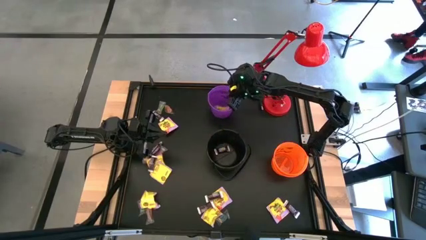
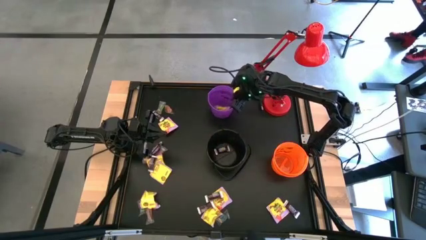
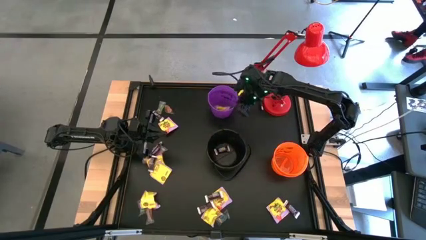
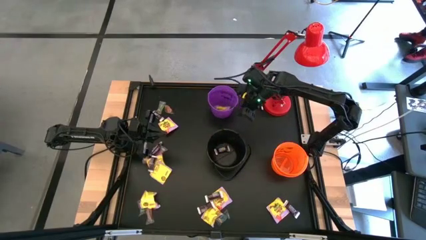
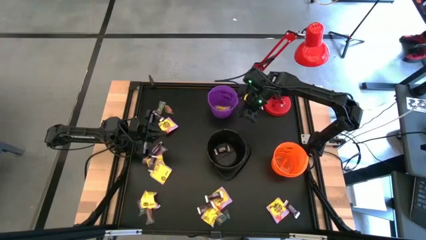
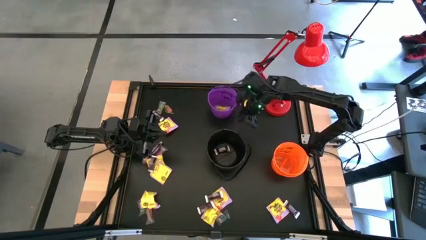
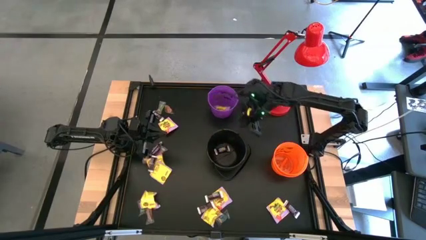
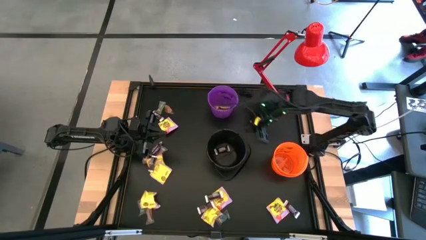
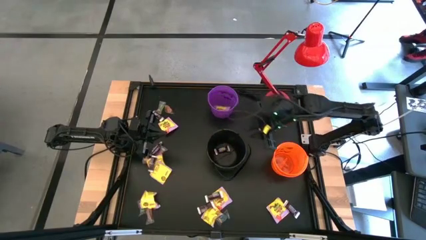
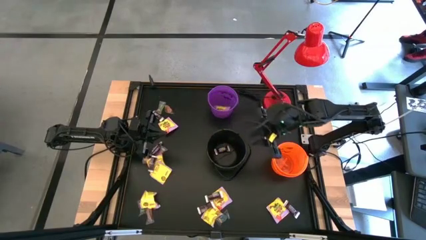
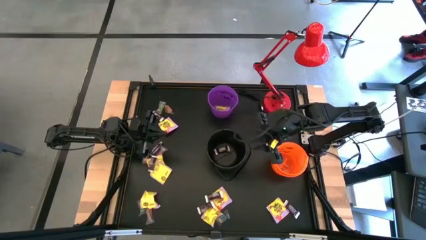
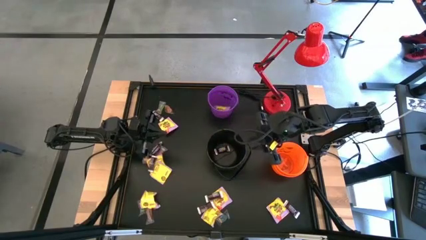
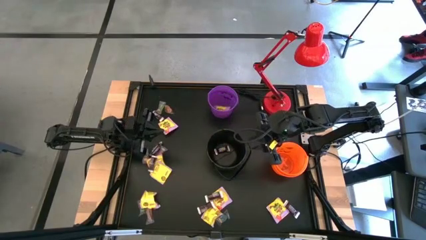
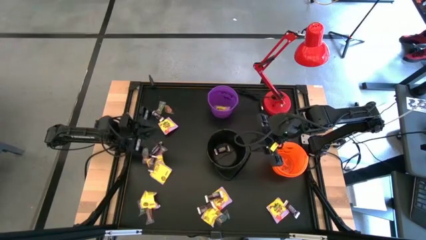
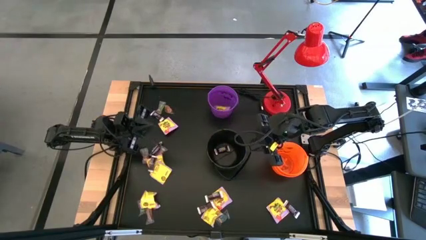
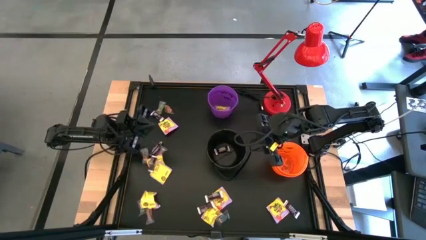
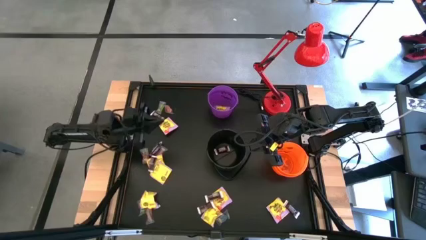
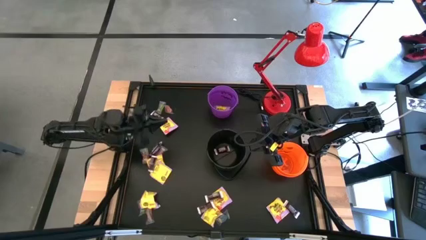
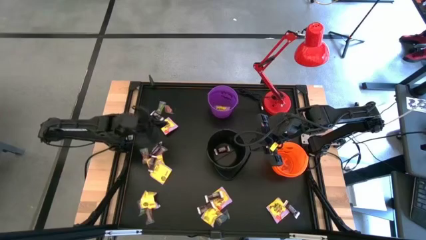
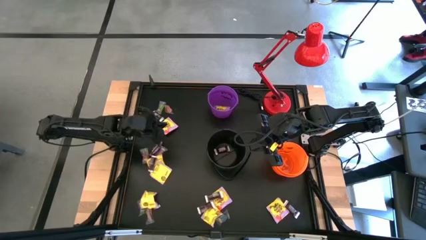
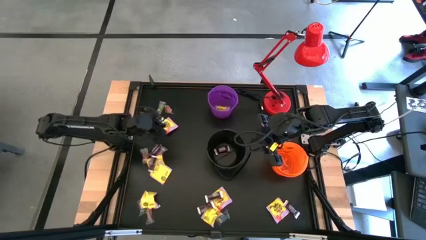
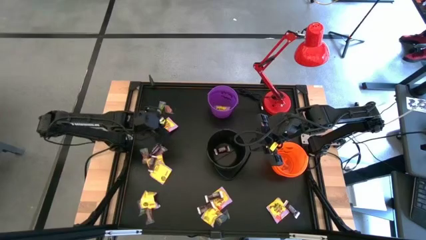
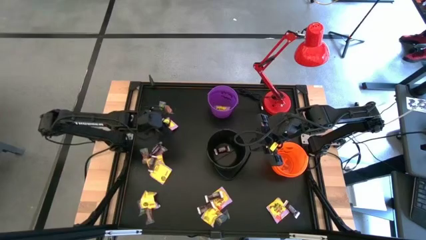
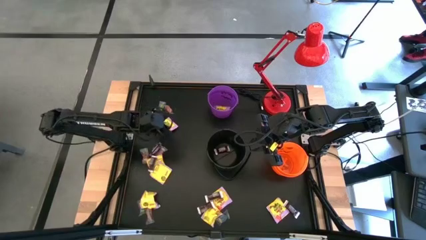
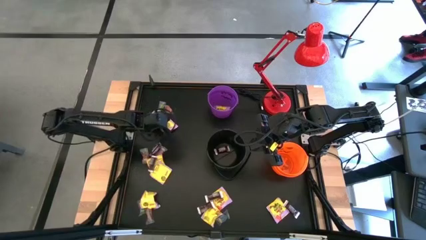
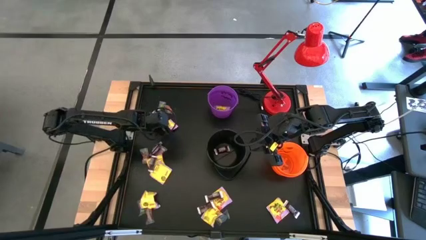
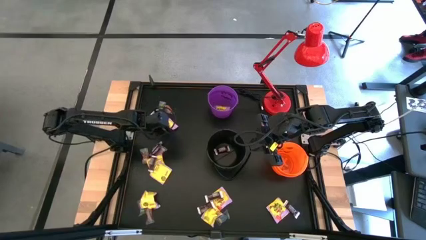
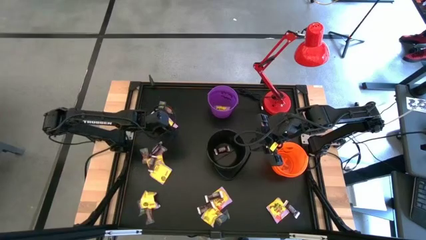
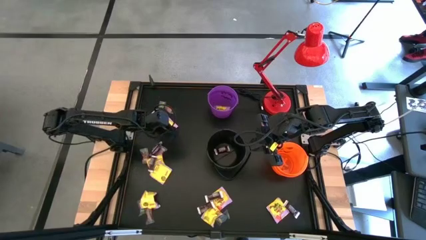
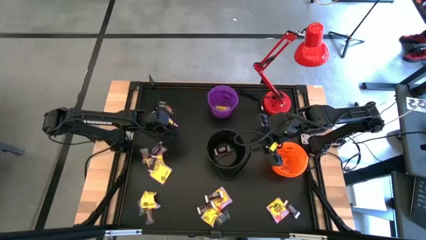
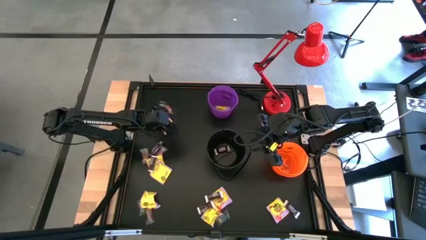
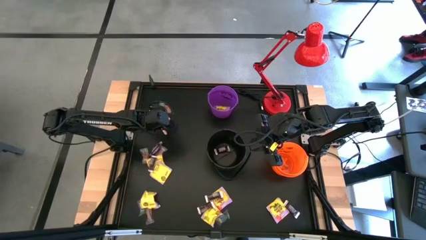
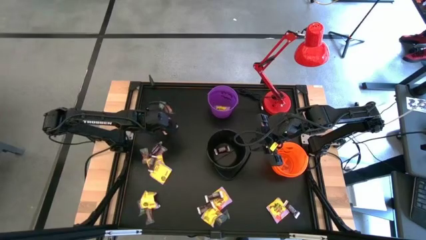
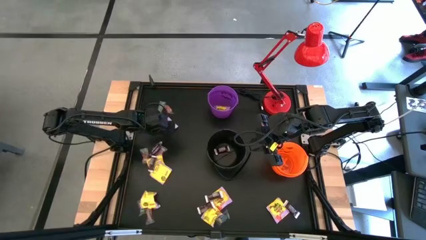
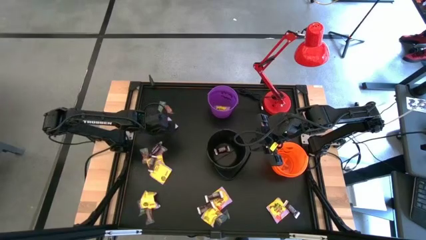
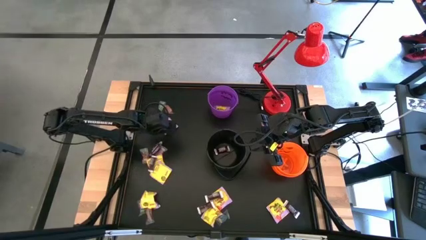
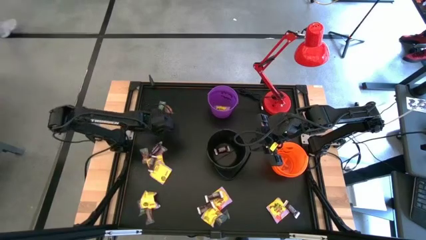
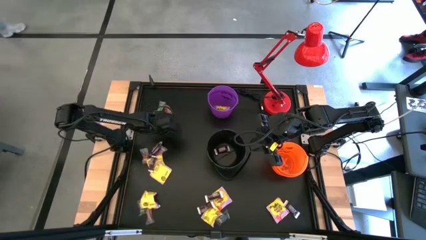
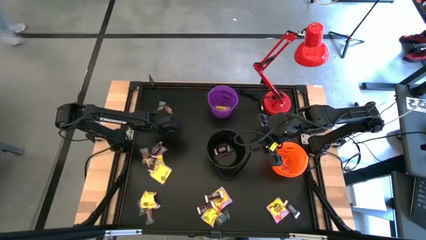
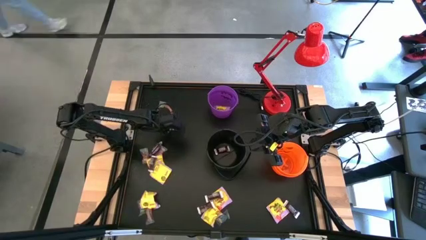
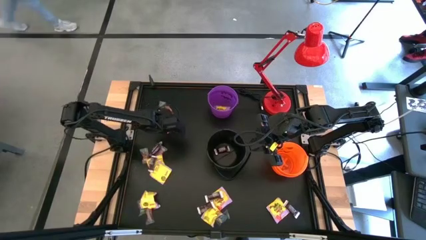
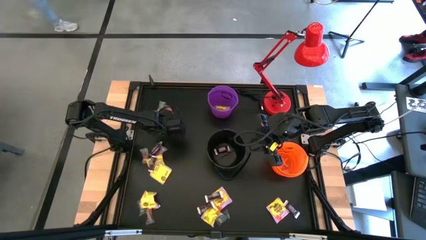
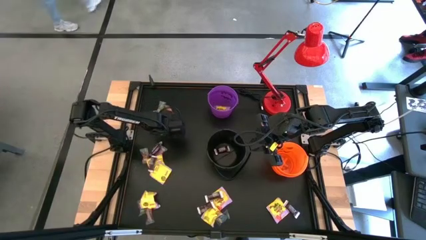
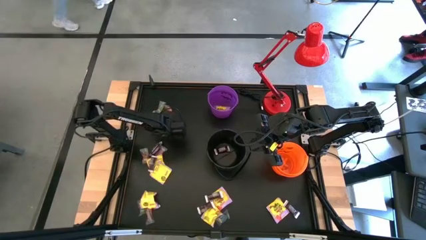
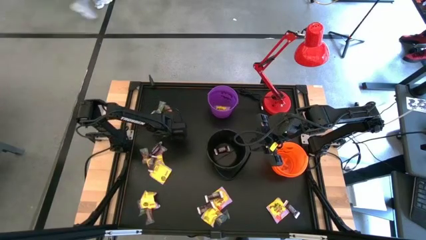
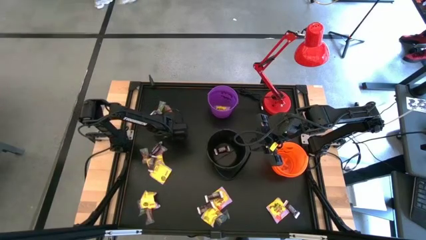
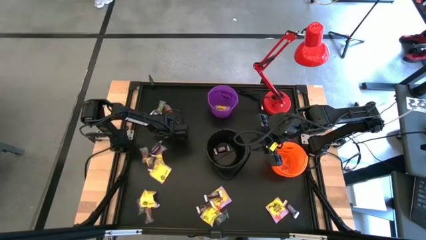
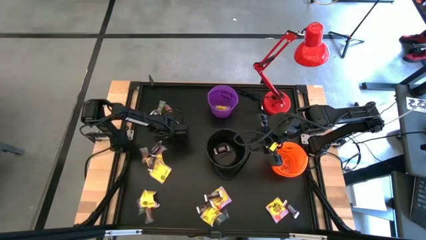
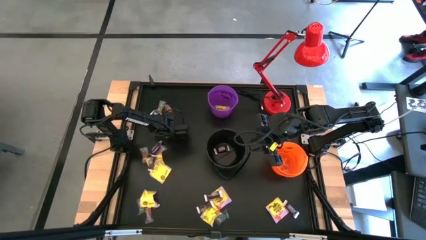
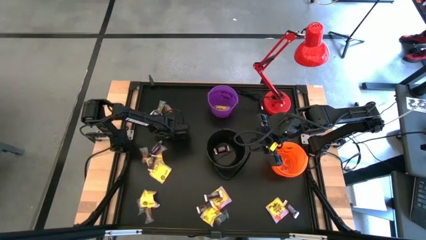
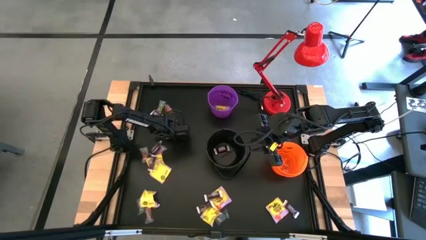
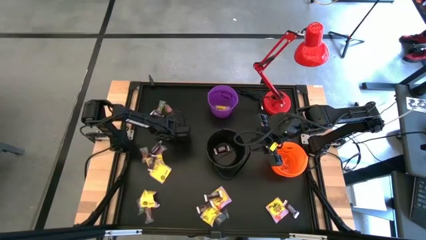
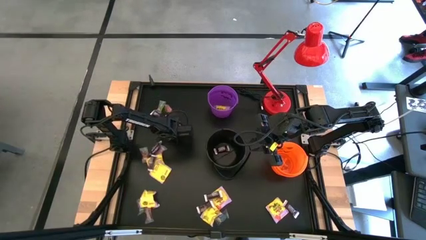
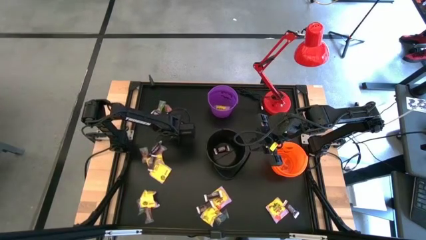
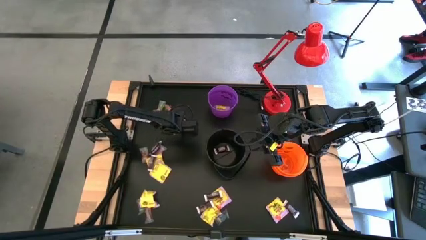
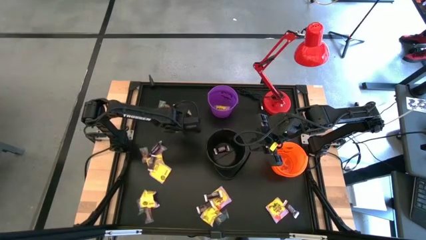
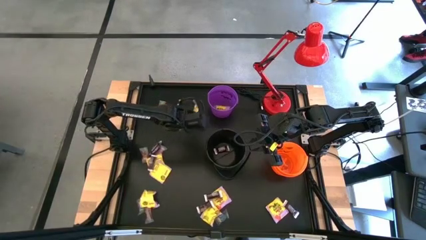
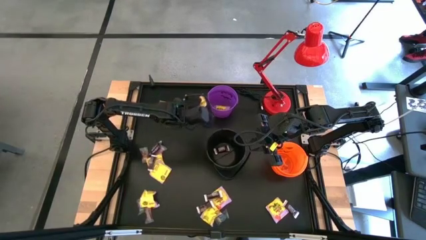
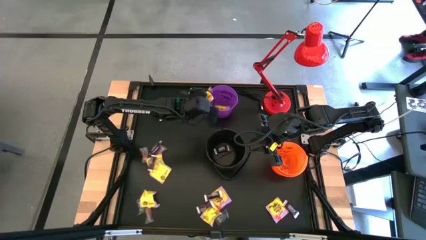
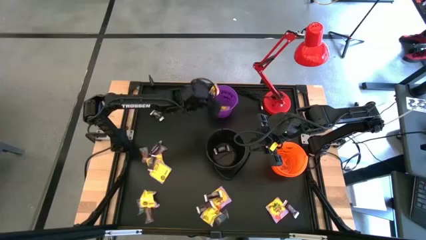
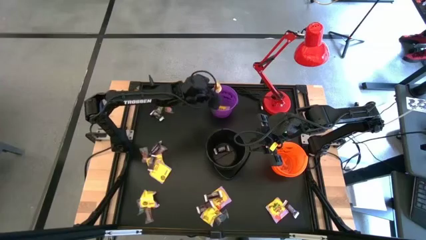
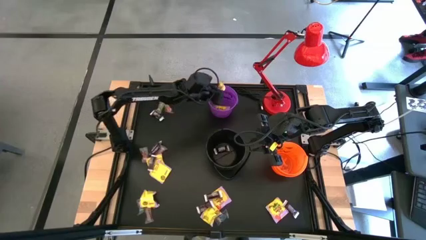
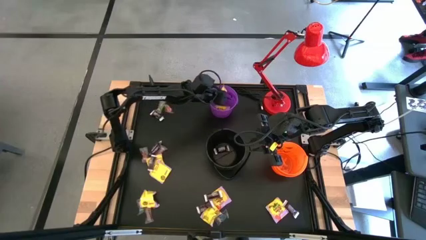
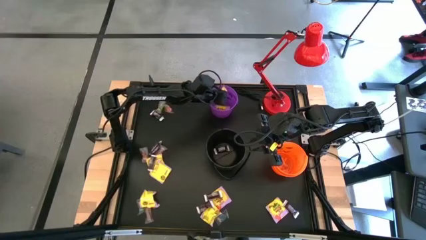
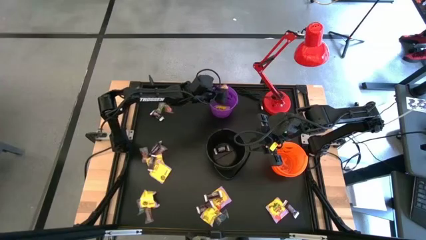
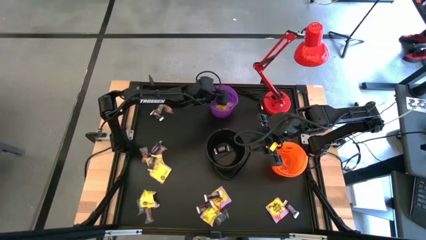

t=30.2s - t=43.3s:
Task: Sort candy
Put the yellow candy into the purple bucket

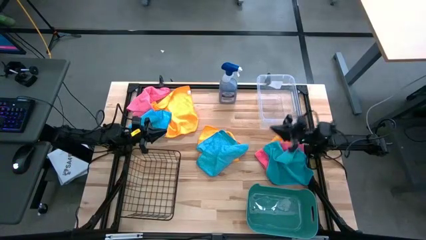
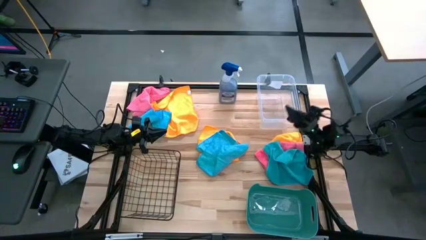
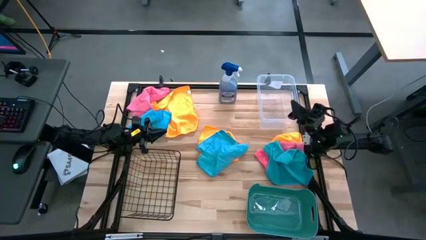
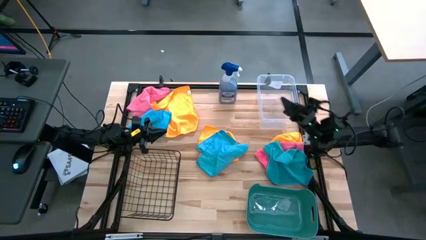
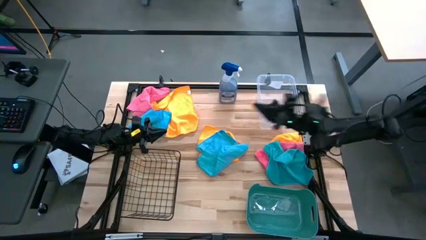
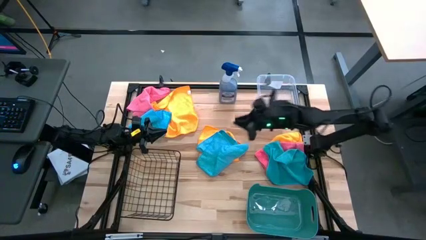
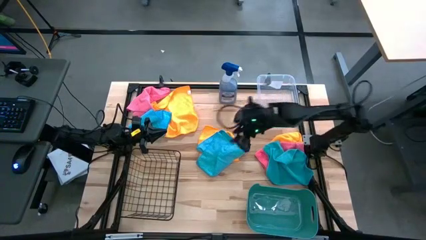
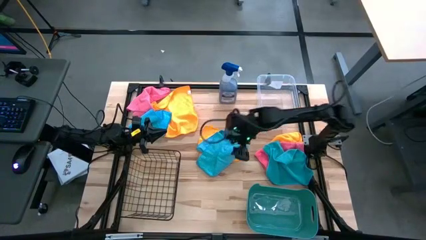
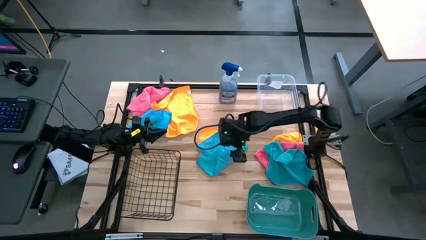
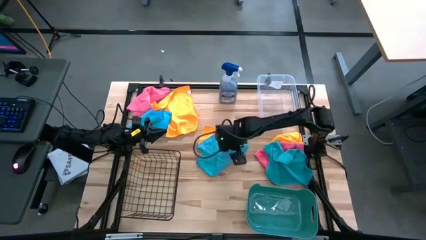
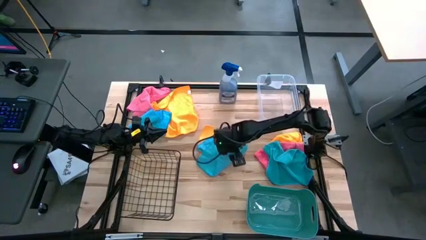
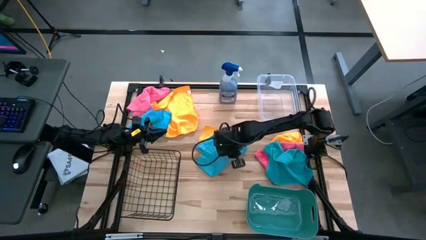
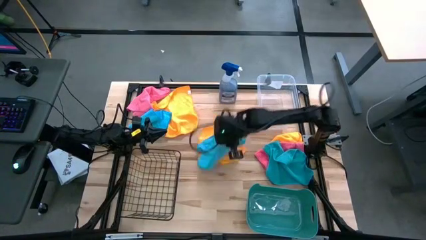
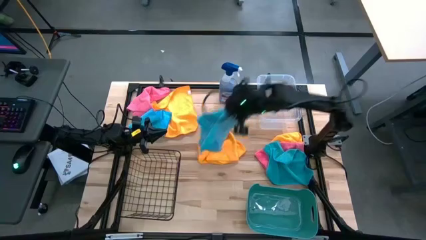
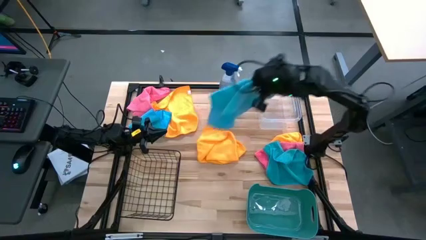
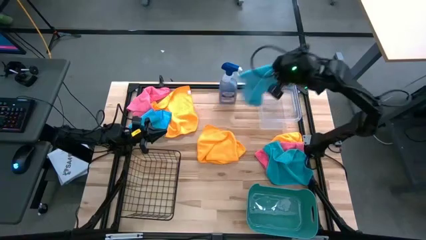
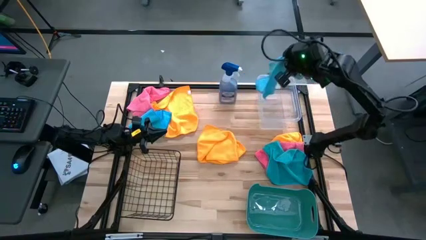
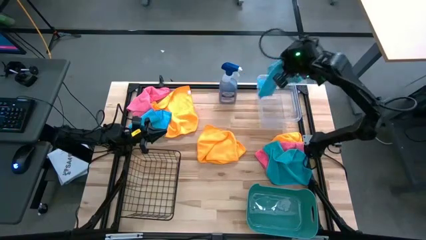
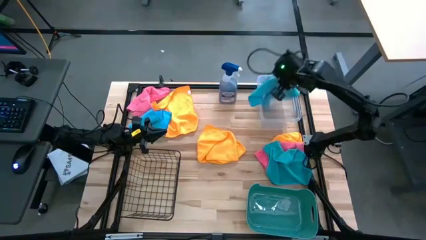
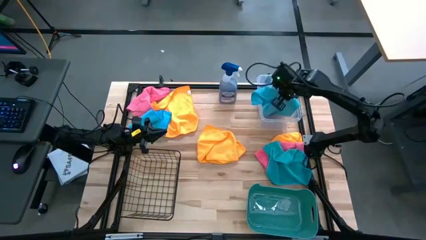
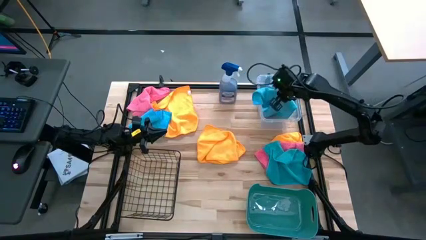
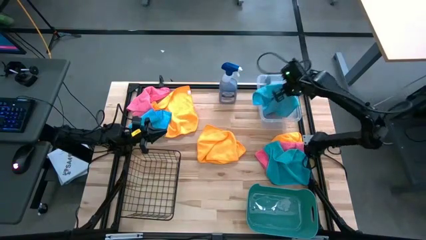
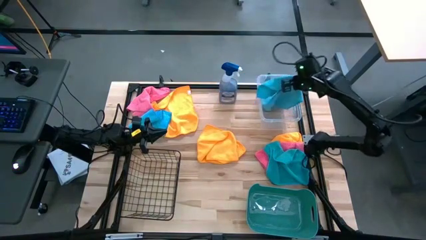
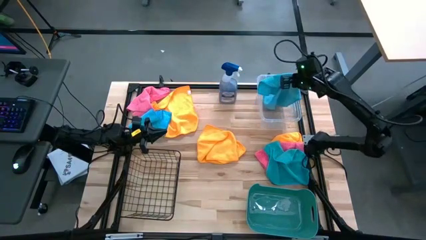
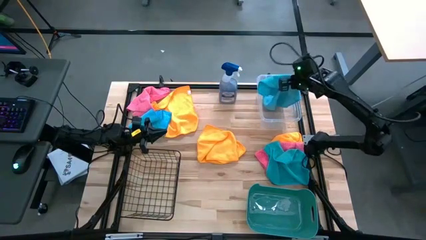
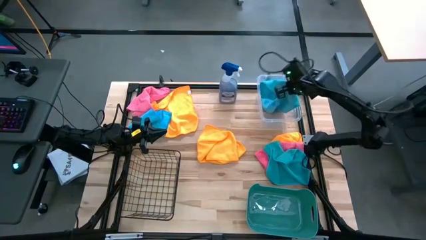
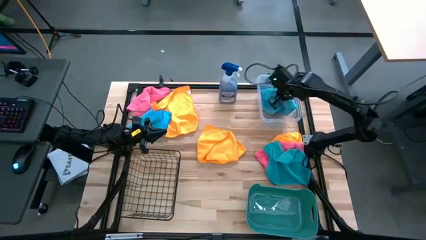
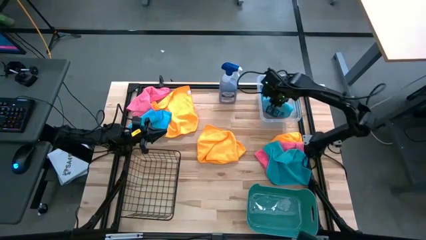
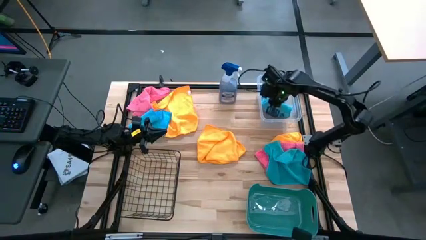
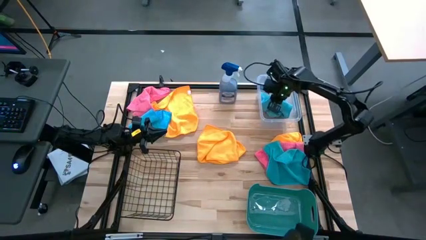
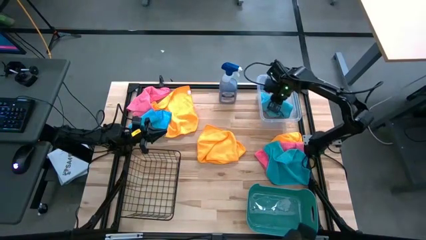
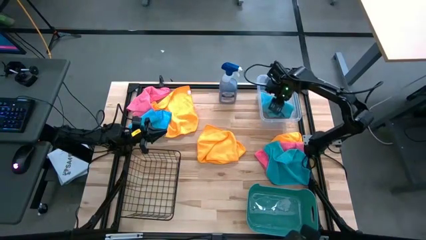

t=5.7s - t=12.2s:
Task: Sort microfiber towel by color & place in baskets
Put the middle blue microfiber towel into the transparent bin
